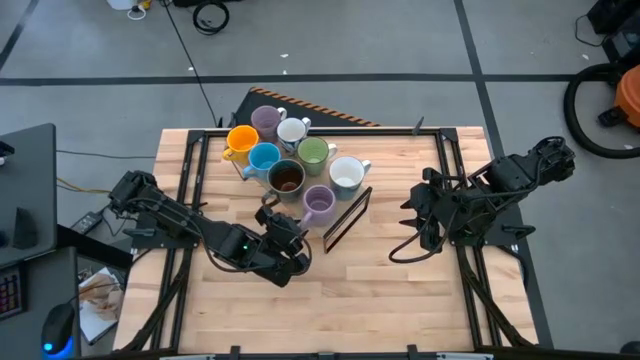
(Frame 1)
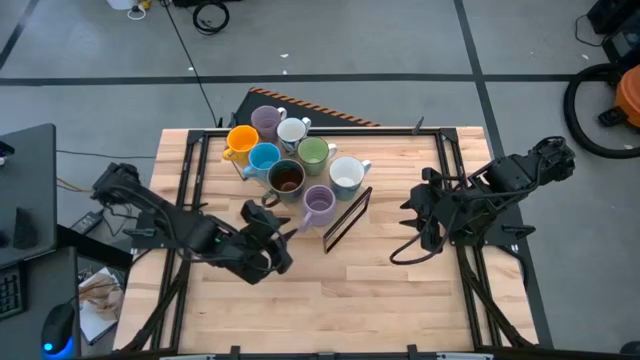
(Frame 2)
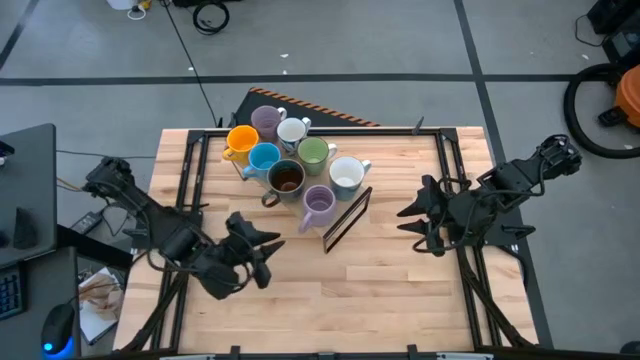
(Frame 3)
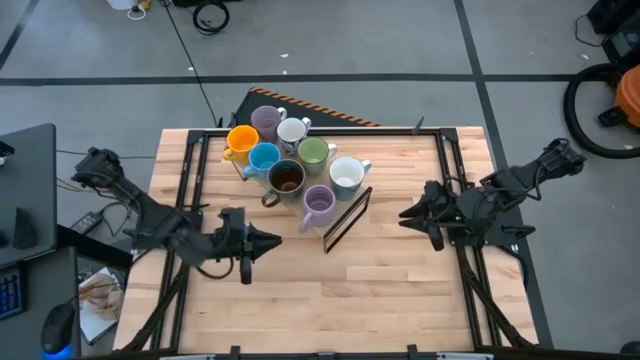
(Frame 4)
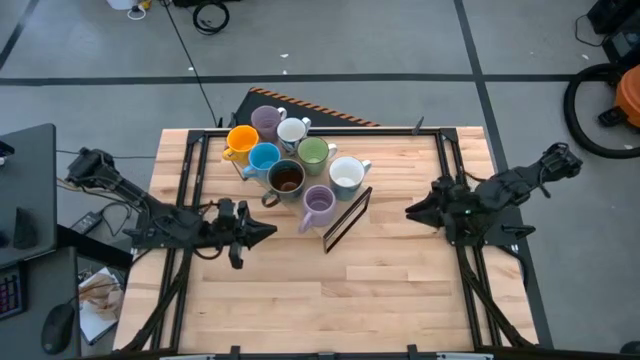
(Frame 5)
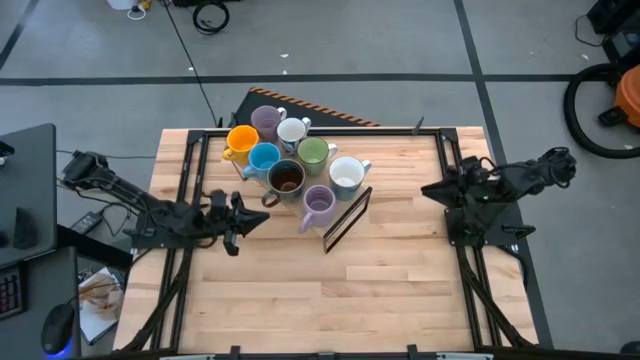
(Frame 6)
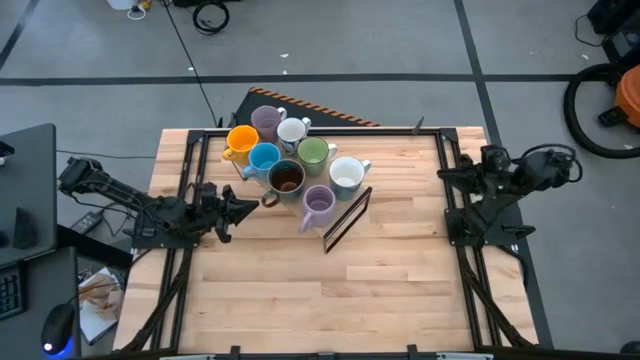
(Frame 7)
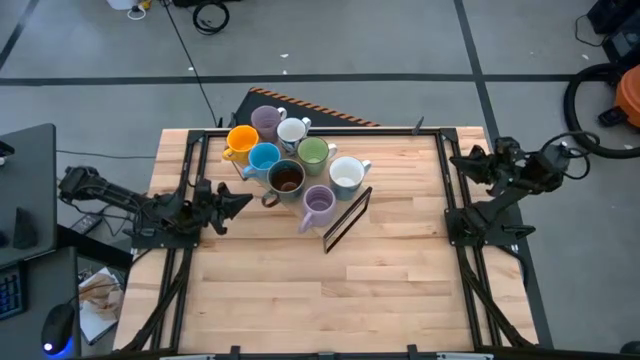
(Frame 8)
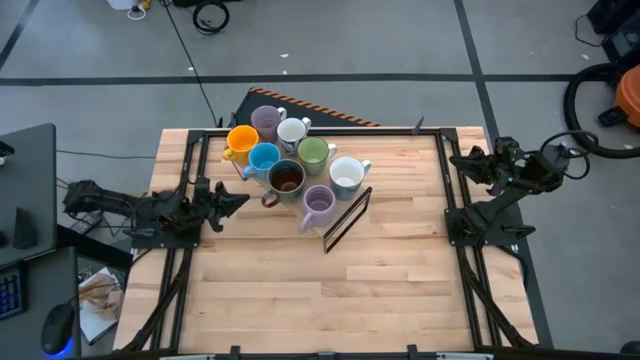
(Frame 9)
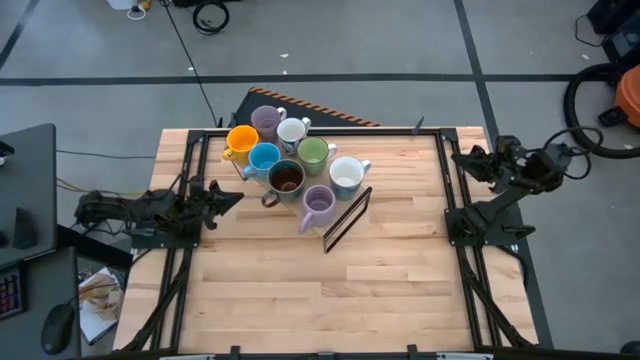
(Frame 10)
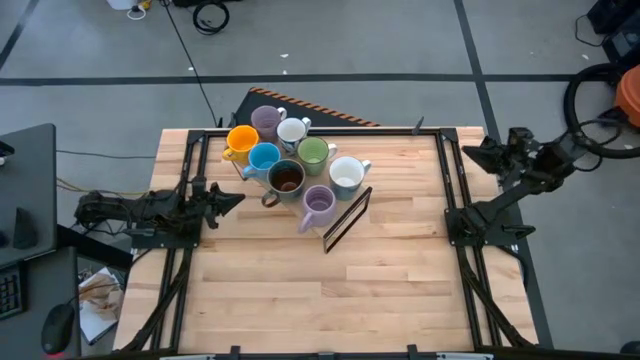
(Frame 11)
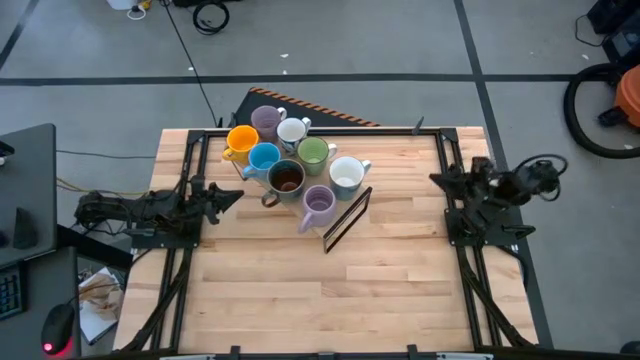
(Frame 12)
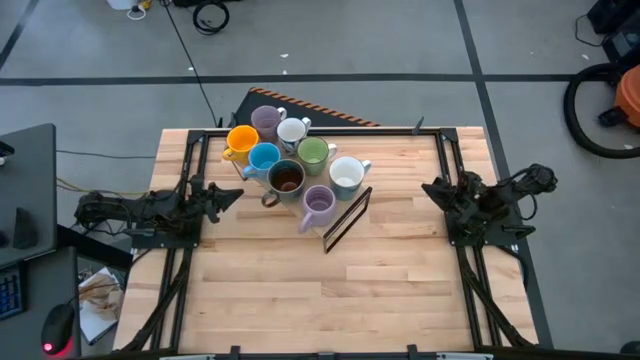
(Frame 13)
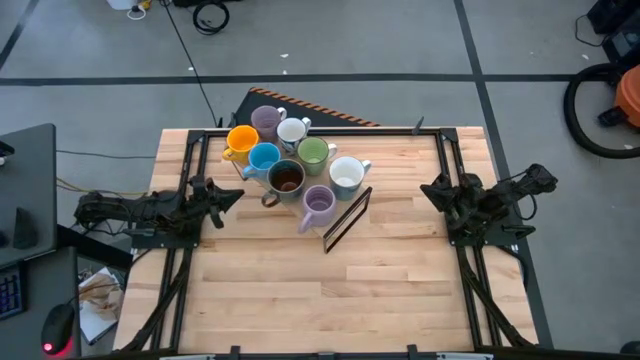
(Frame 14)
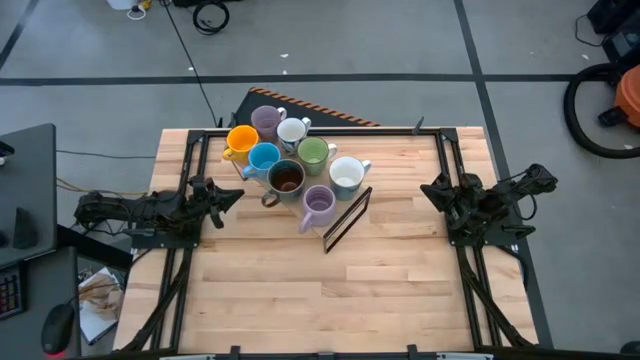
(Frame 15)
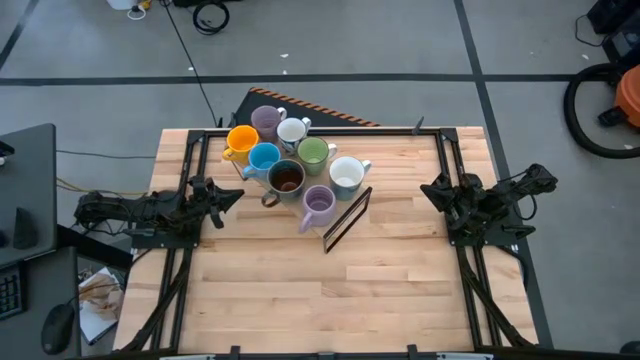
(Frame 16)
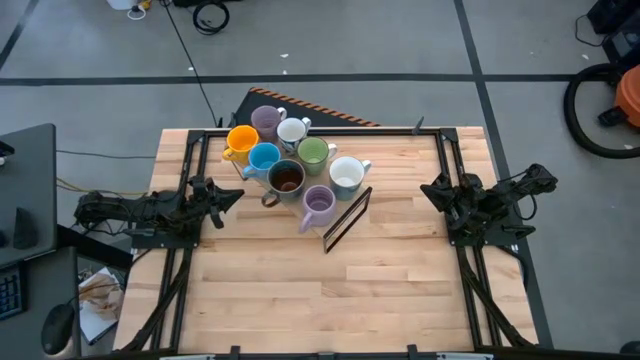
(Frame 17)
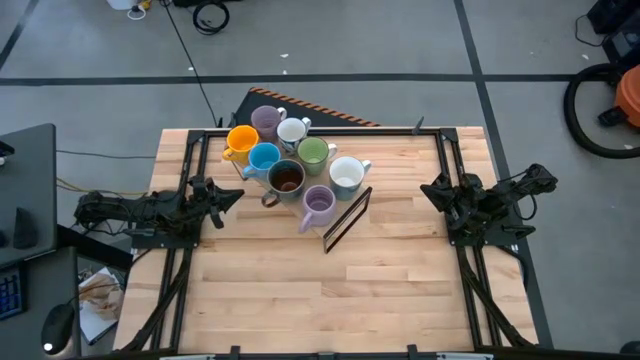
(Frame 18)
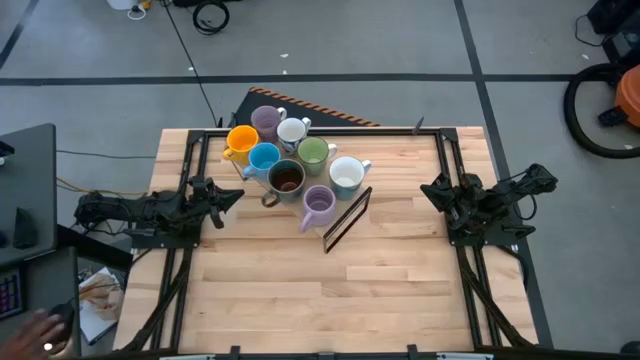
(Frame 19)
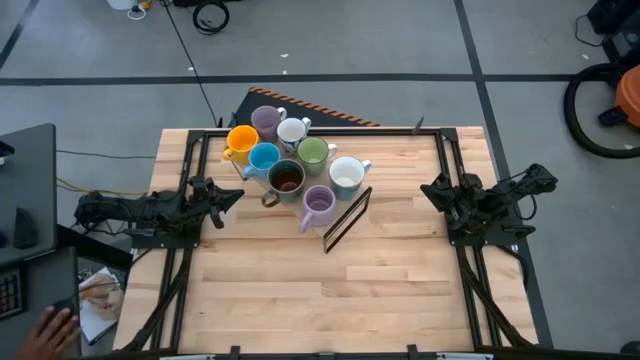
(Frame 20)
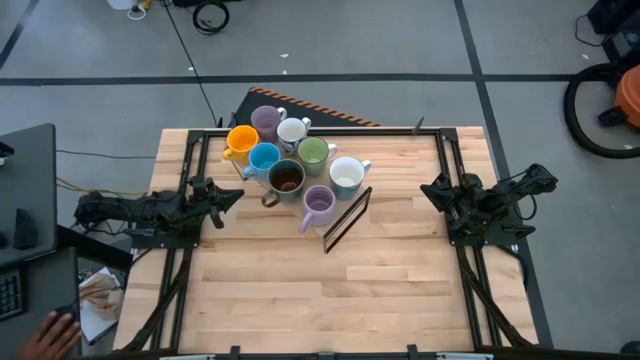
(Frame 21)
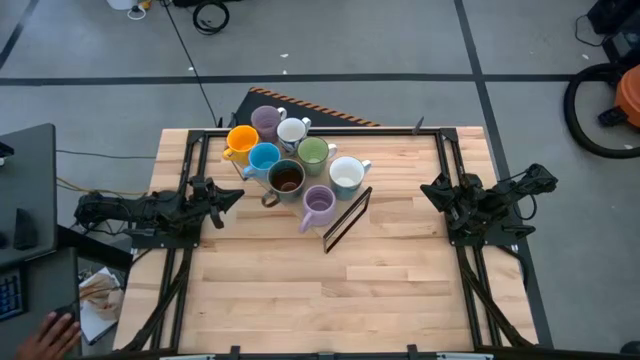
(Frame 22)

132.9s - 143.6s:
Task: Place coffee mugs
Return to Home Position

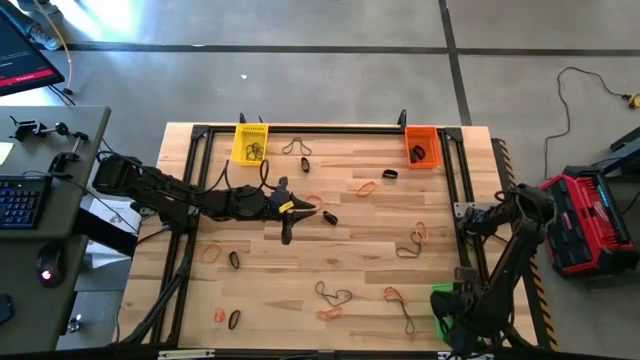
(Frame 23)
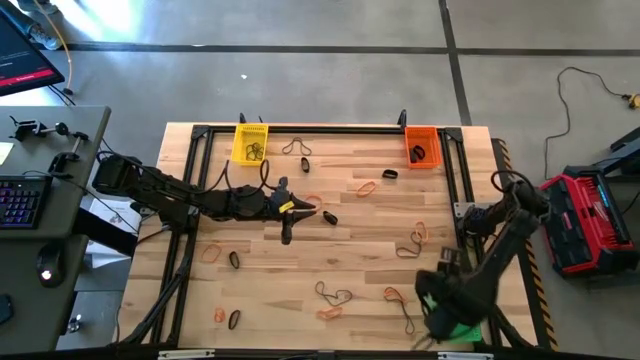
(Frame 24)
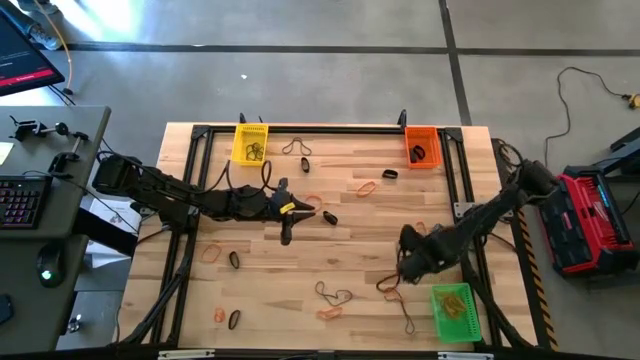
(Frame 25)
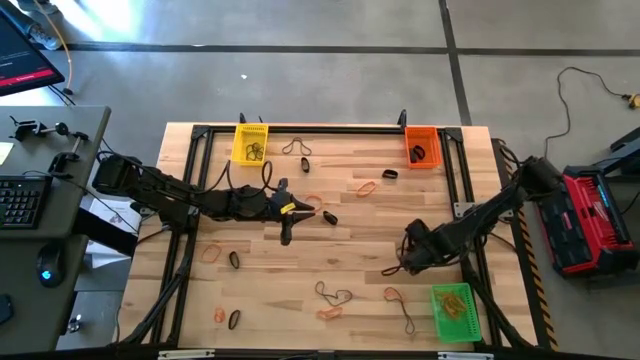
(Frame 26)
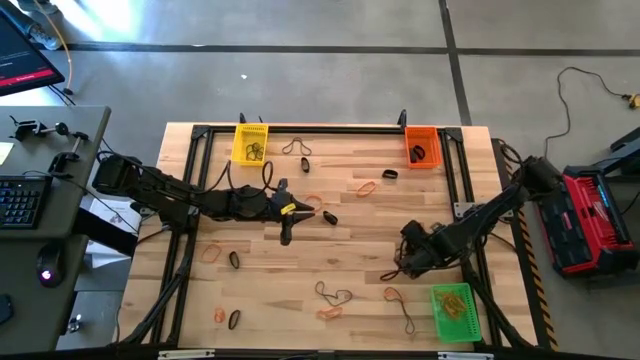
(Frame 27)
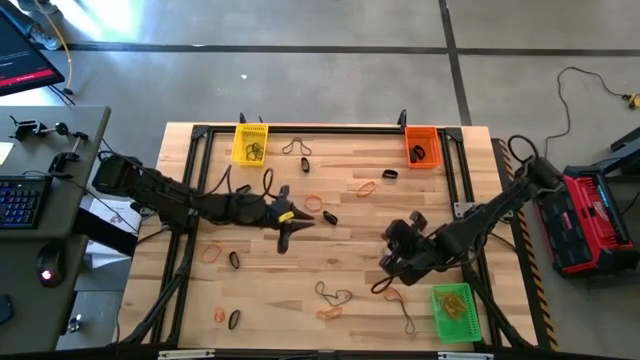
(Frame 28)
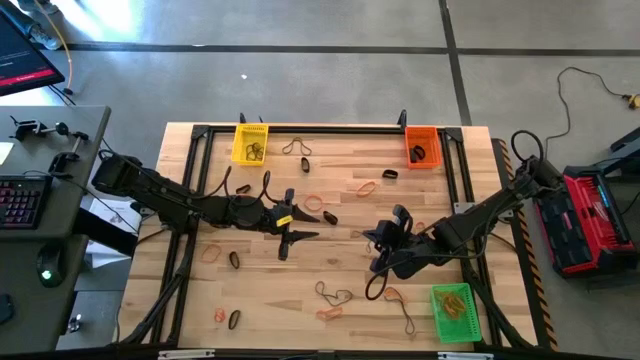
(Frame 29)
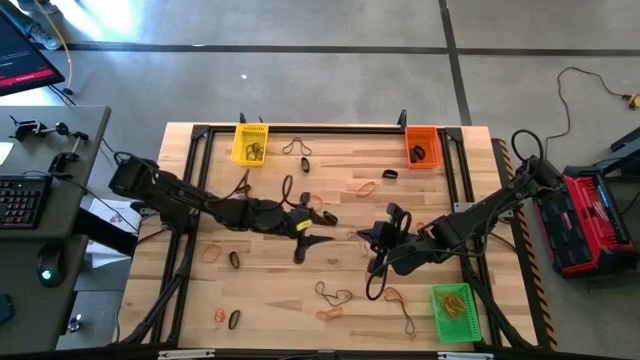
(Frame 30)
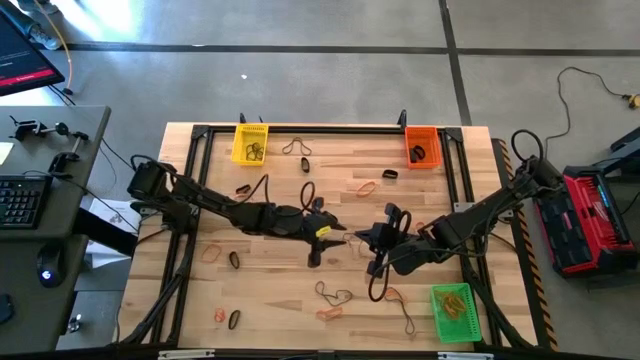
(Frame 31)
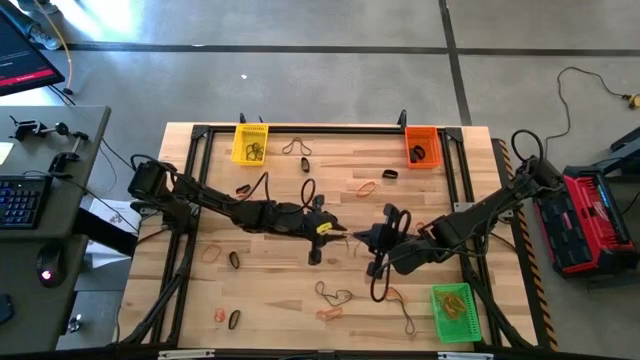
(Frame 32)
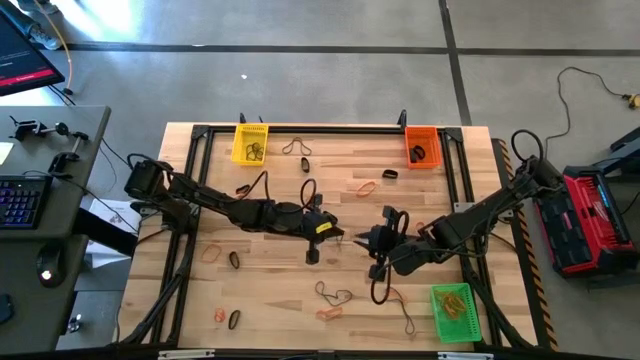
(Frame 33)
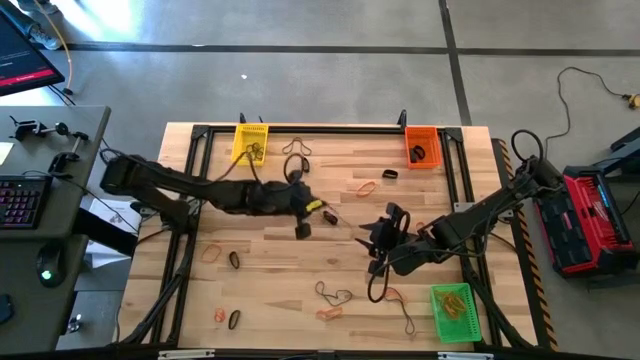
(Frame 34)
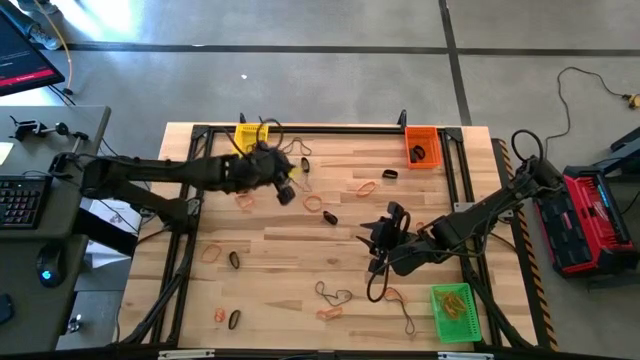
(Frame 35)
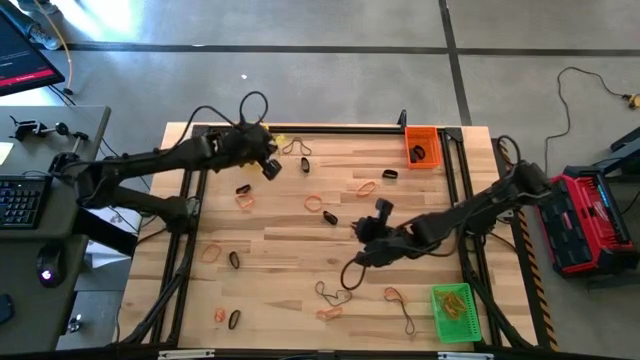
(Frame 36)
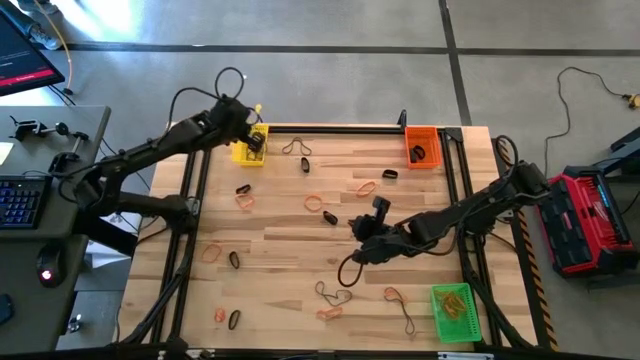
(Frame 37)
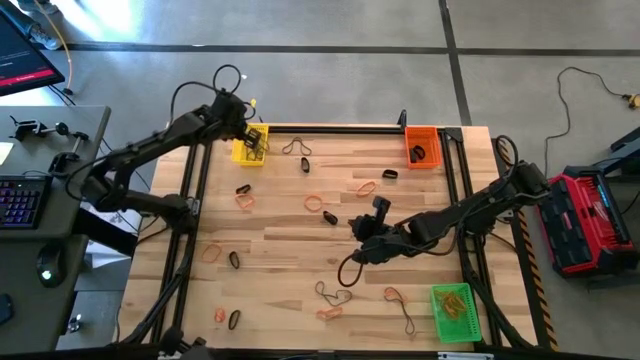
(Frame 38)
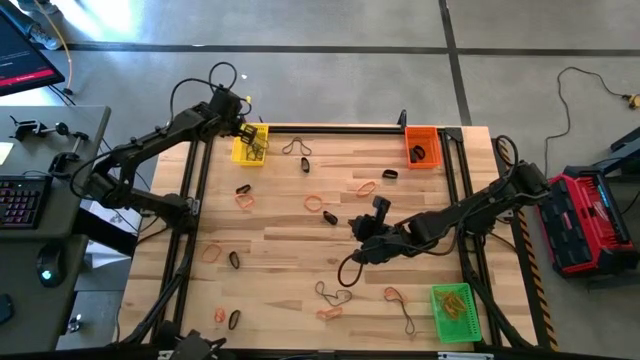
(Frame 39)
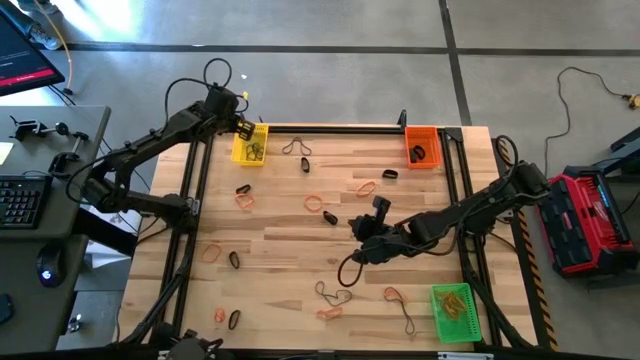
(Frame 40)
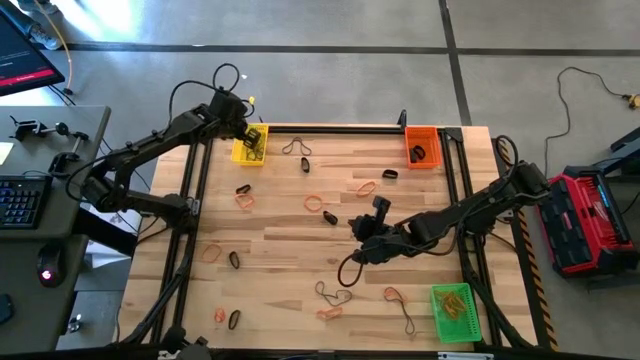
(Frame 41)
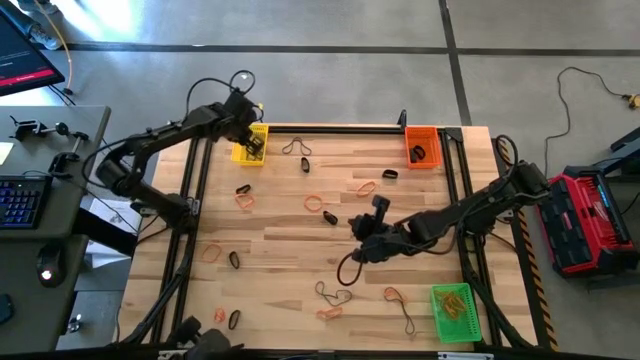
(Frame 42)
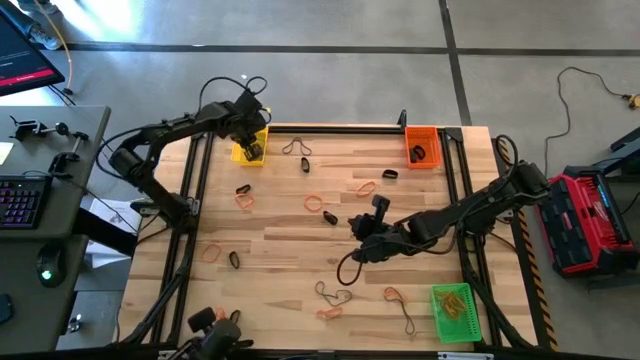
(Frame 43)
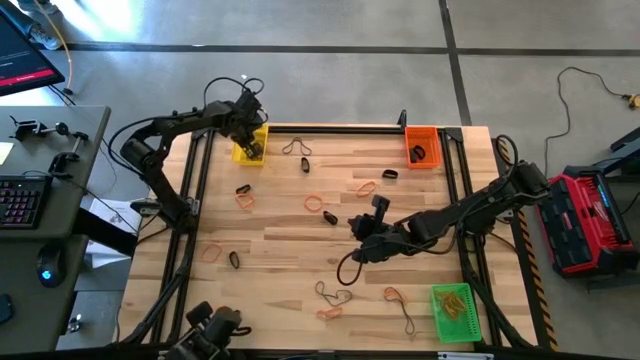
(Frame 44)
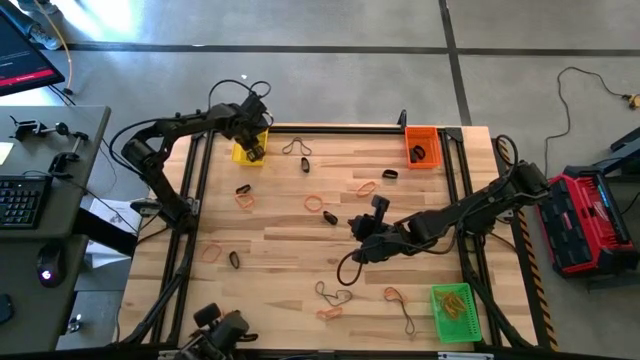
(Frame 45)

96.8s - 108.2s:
Task: Sort rubber bands into baskets
Put the purple rubber band into the yellow bin
